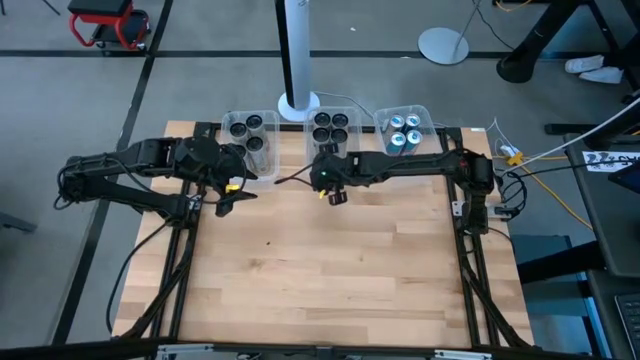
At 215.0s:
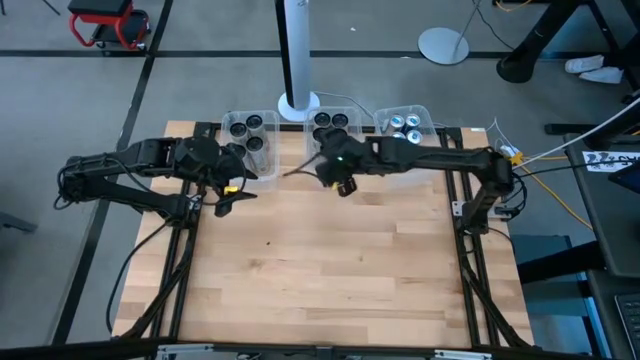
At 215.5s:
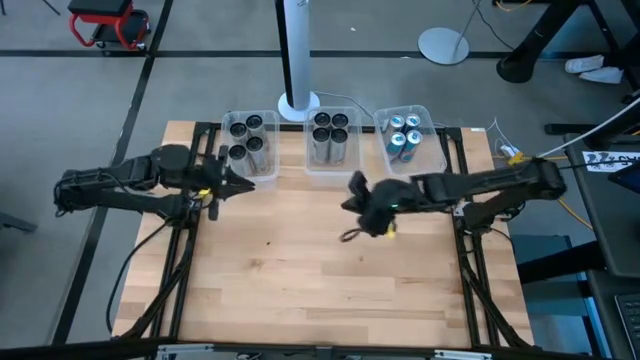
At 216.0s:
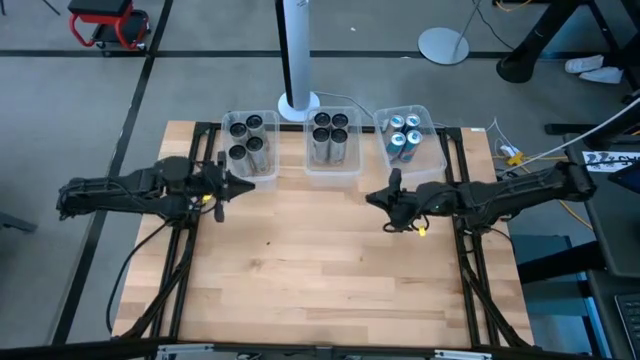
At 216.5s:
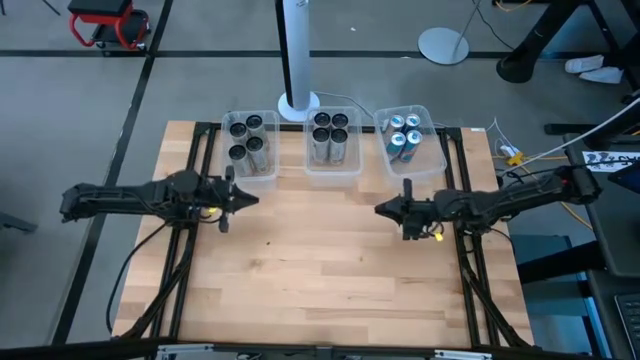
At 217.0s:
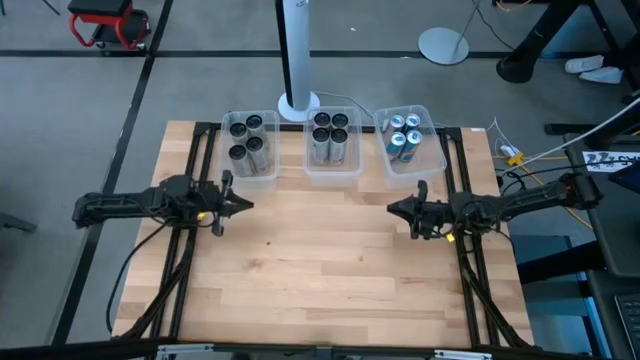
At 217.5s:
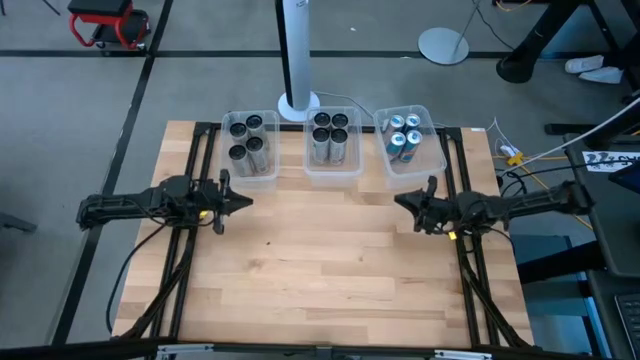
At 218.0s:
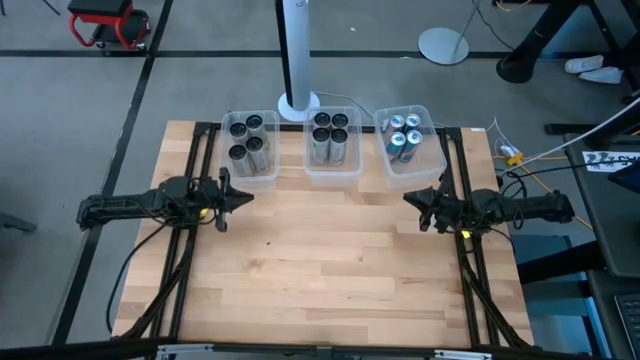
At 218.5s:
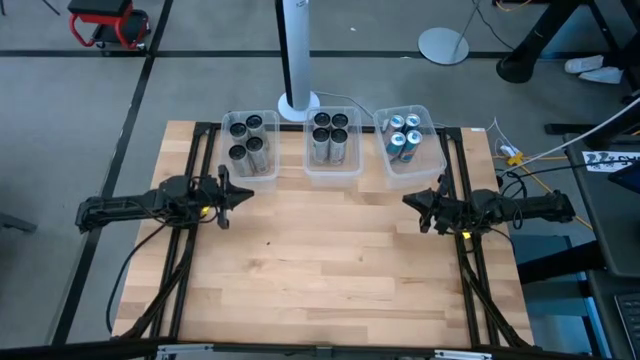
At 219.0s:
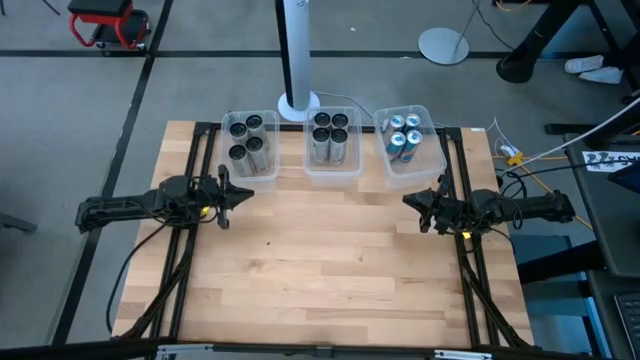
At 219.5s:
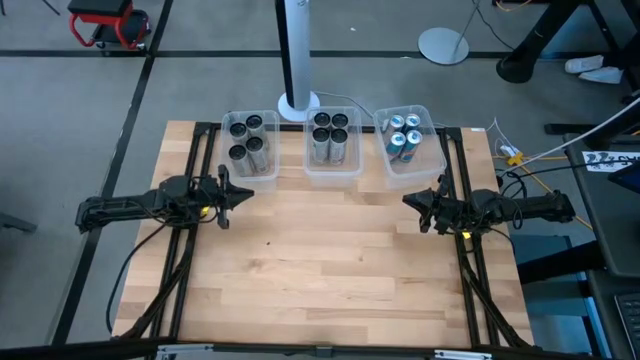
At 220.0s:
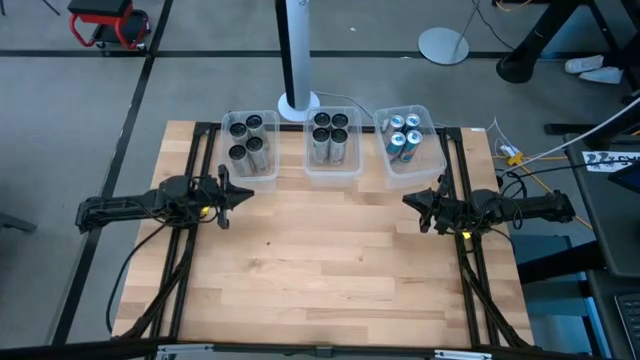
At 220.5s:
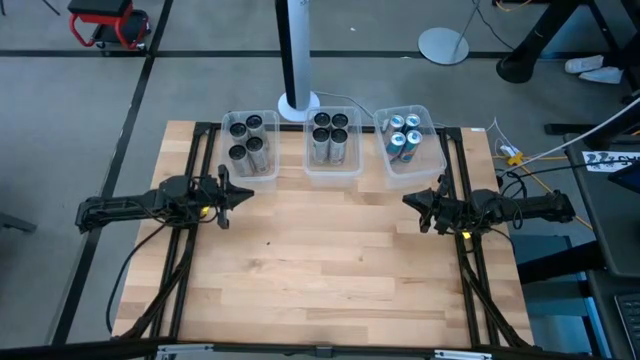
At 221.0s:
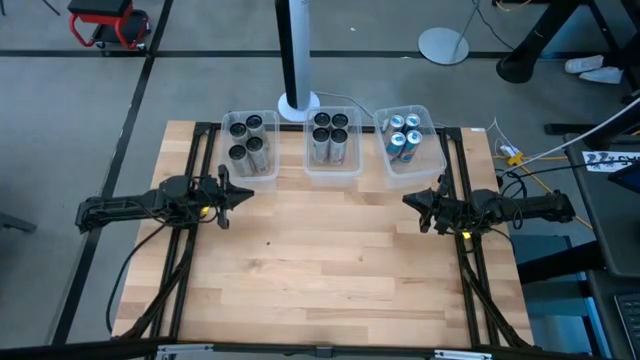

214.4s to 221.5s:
Task: Sort soda cans
Return to Home Position

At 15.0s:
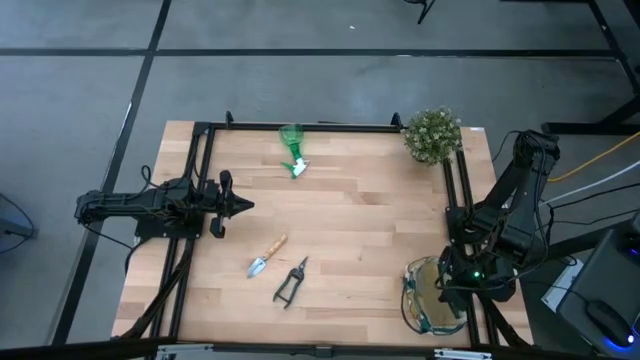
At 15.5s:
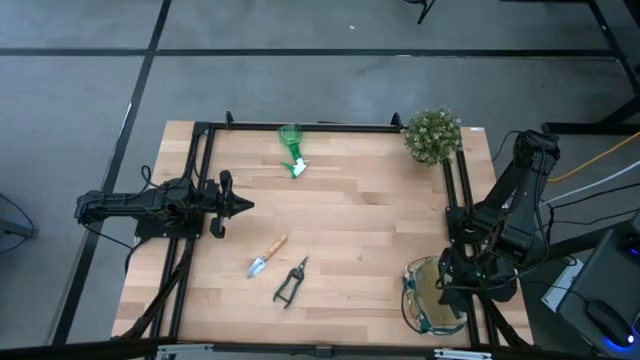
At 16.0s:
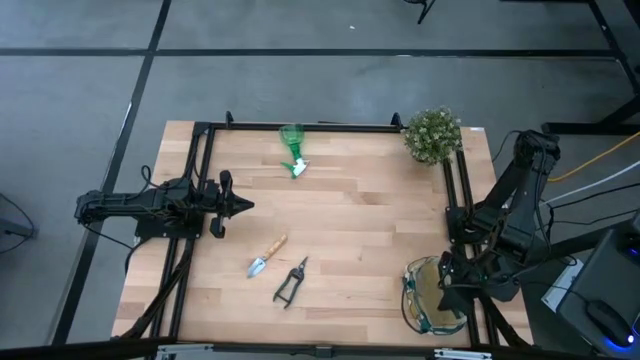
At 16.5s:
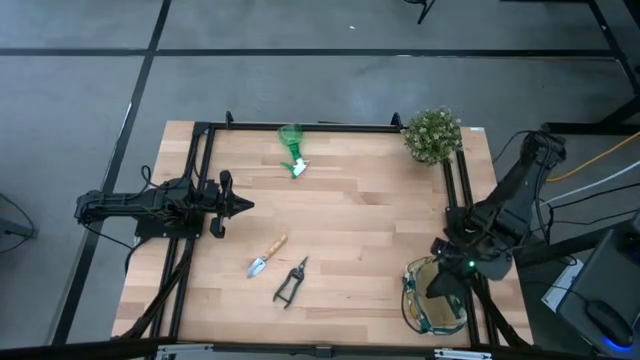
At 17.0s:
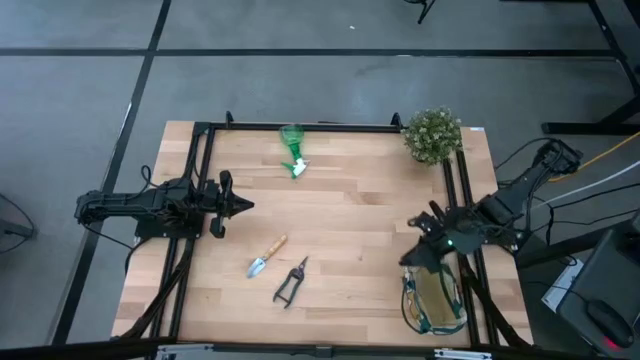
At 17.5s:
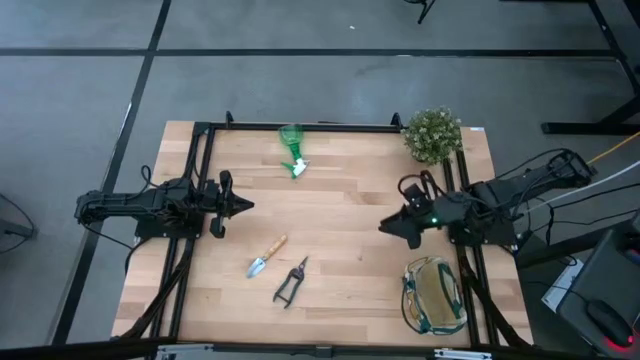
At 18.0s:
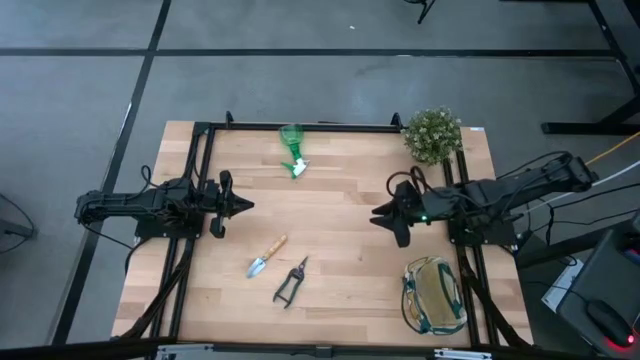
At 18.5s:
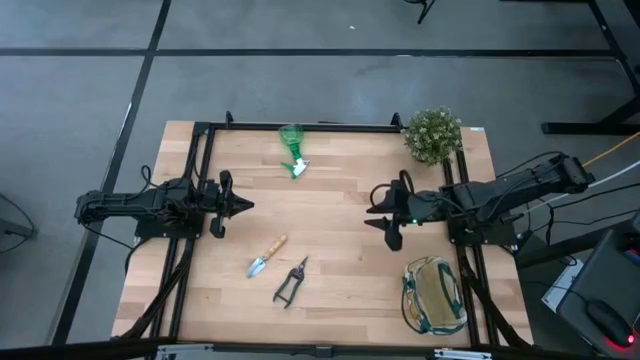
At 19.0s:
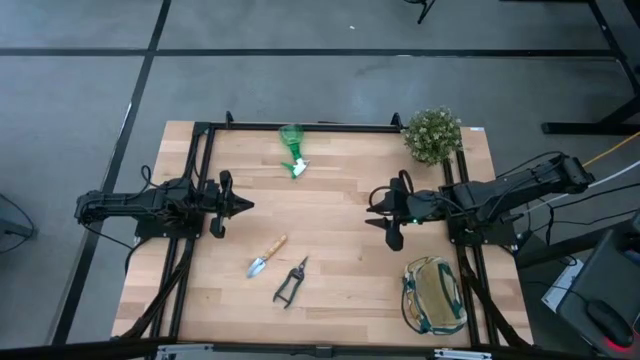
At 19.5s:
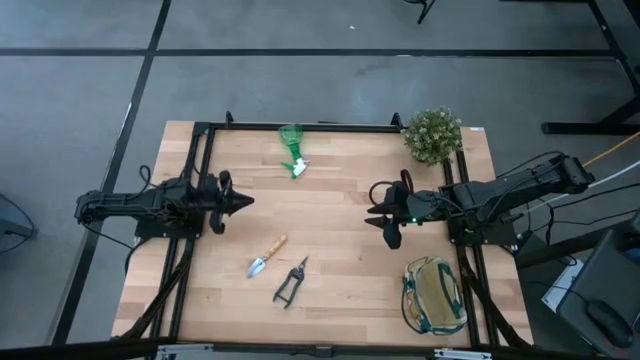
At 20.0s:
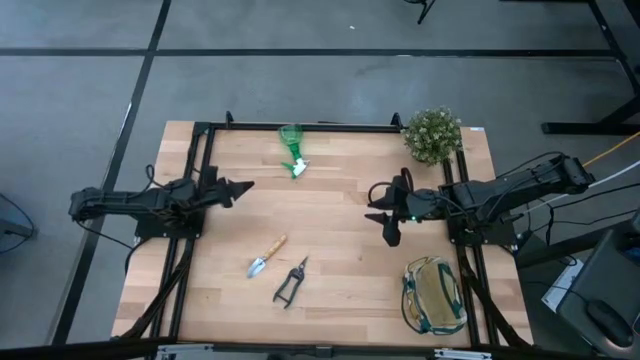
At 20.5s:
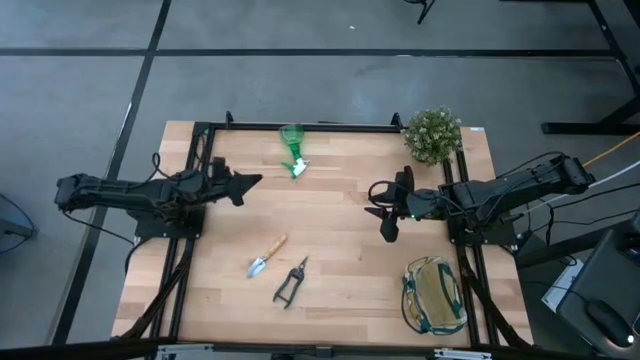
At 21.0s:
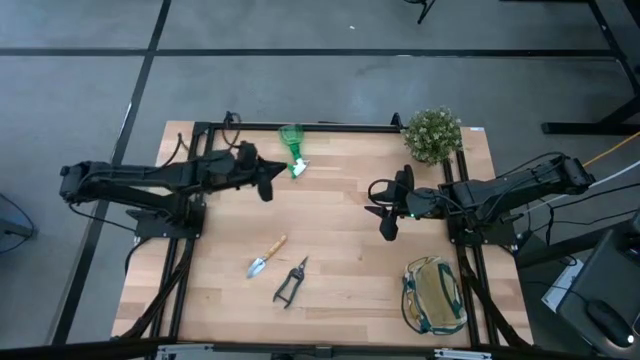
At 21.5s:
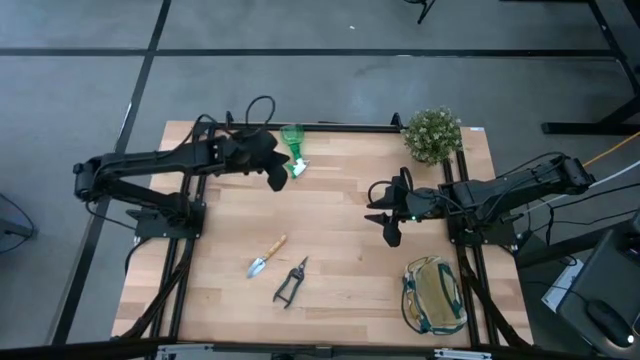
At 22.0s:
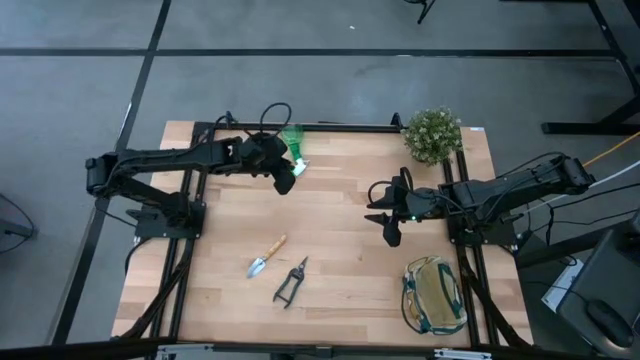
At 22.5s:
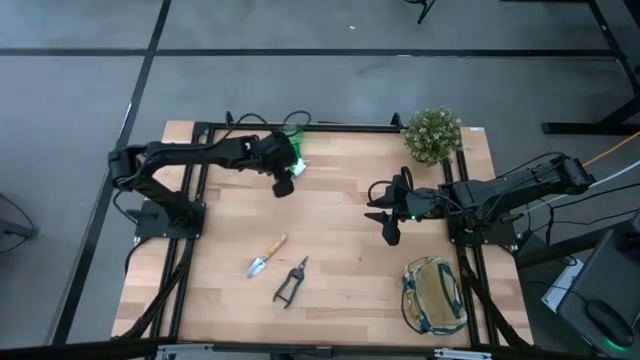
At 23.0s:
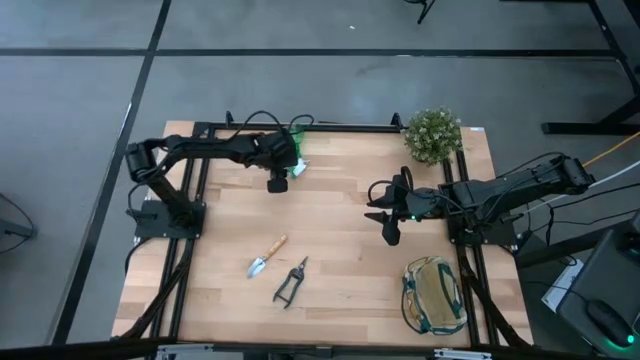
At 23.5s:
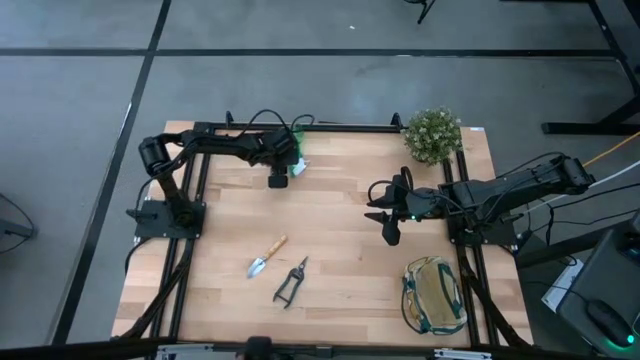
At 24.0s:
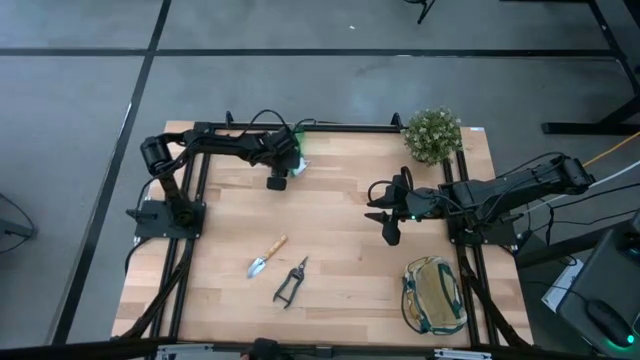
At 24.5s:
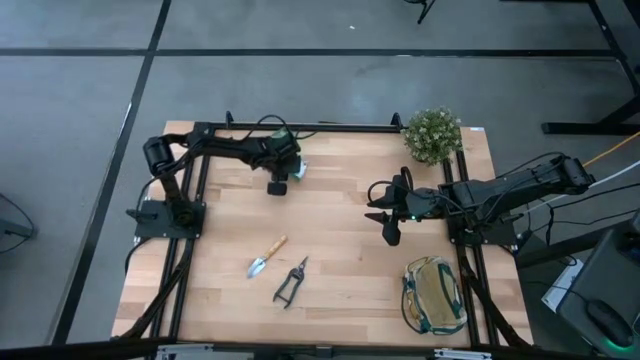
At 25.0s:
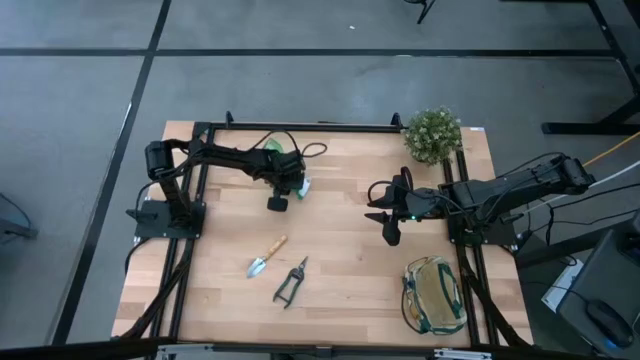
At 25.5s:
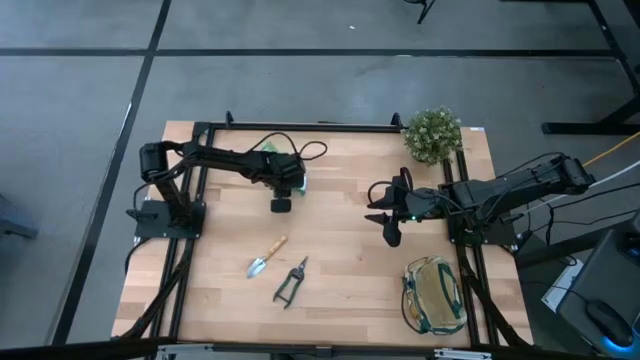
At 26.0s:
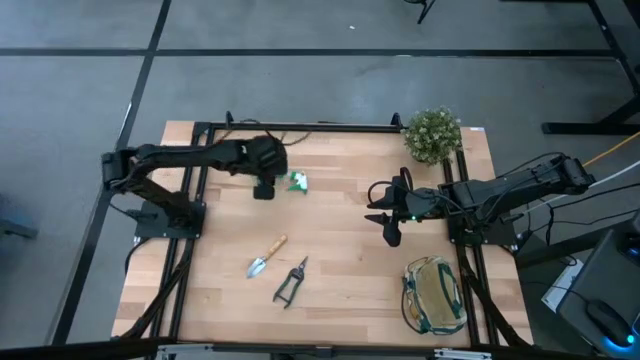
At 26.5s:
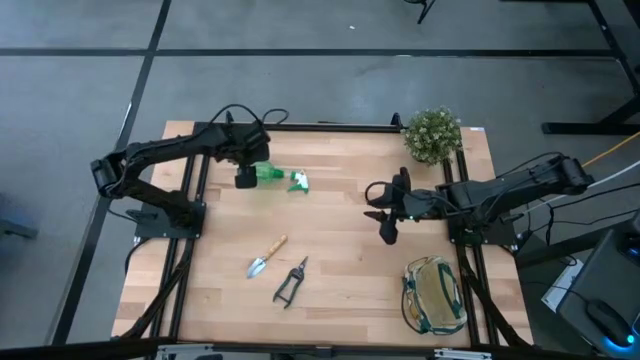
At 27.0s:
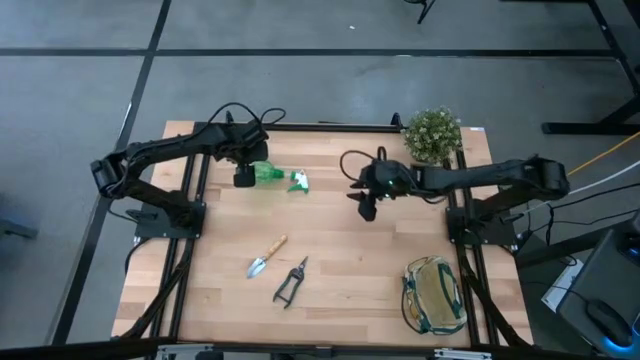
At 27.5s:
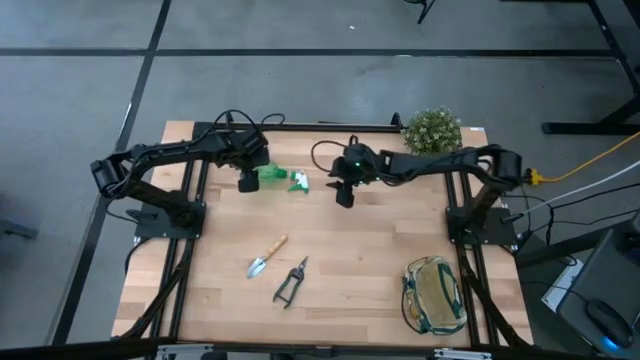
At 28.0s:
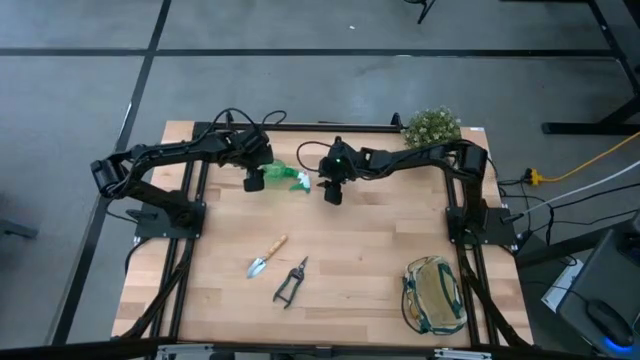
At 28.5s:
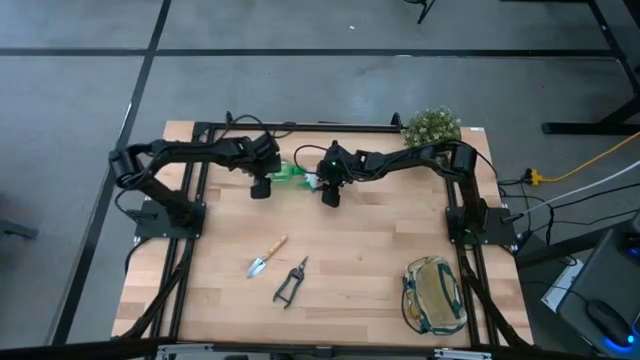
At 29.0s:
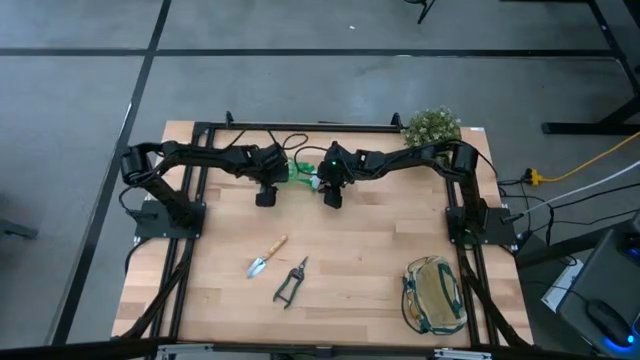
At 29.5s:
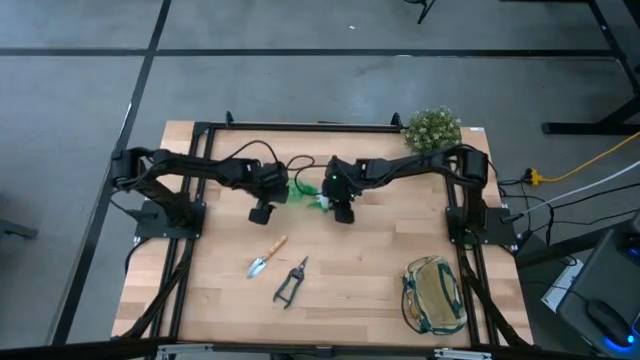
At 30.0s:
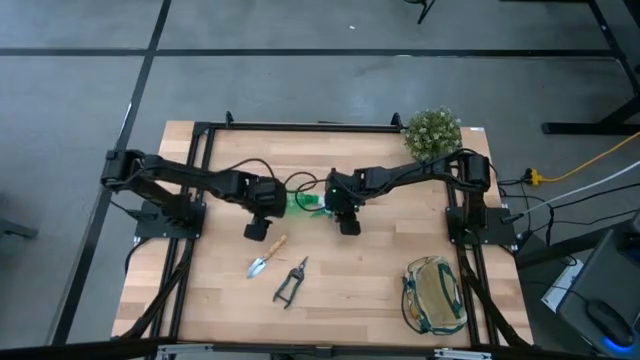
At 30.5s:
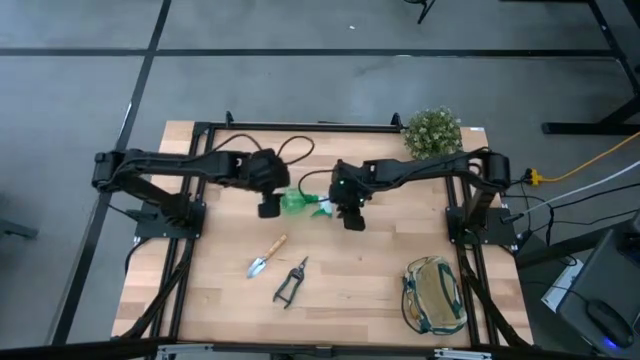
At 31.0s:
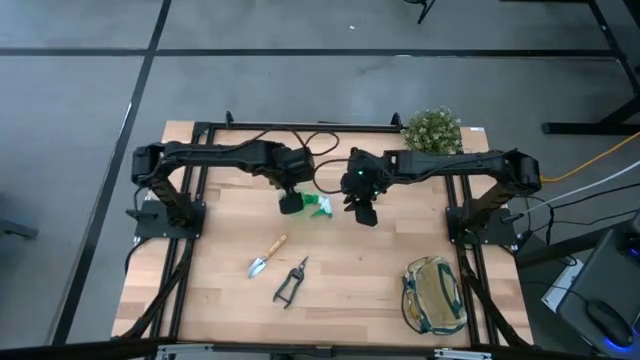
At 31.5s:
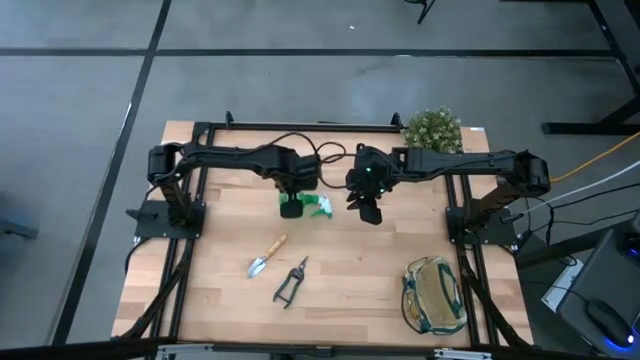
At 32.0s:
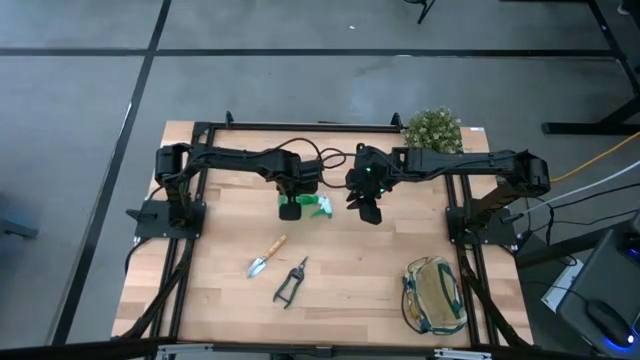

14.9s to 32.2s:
Task: Pick & Place Garden tools in Gardening bag
Put the green spray bottle into the gardening bag
